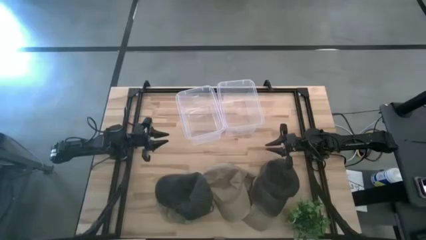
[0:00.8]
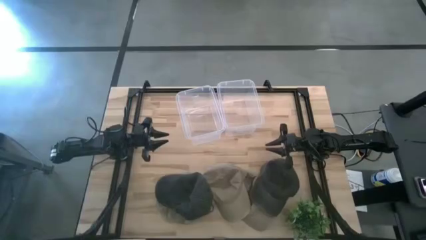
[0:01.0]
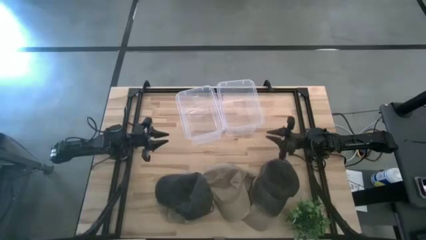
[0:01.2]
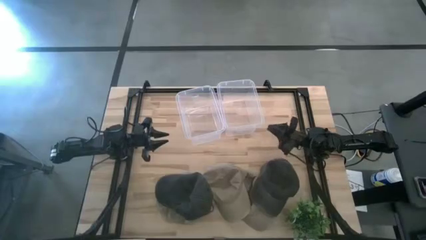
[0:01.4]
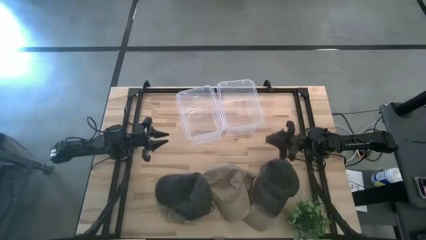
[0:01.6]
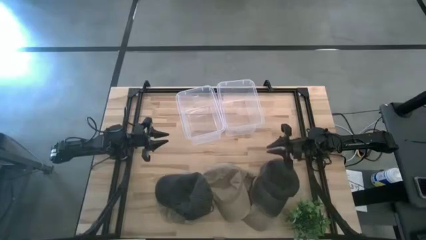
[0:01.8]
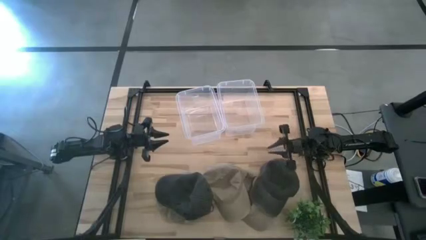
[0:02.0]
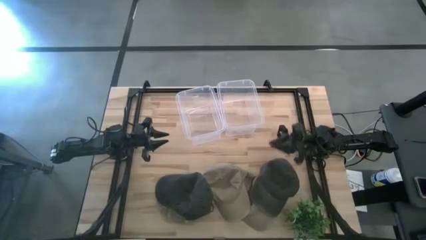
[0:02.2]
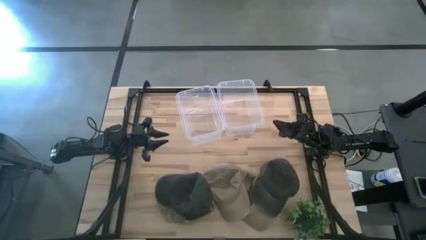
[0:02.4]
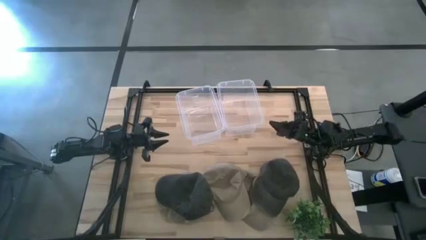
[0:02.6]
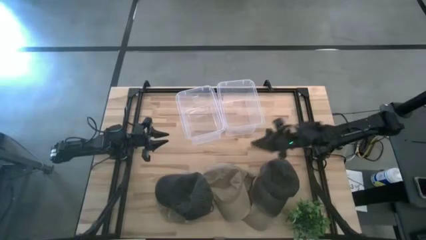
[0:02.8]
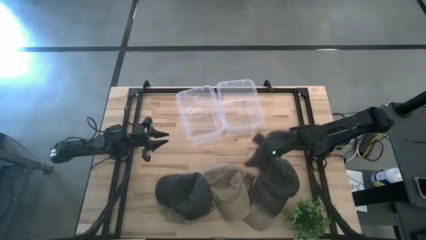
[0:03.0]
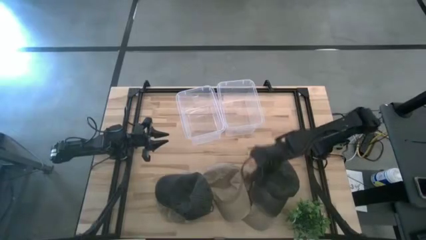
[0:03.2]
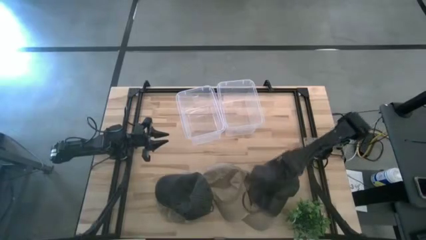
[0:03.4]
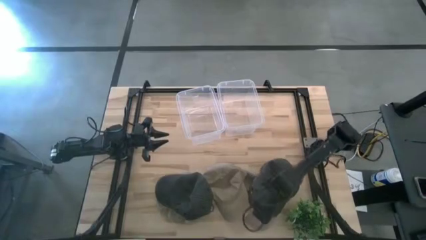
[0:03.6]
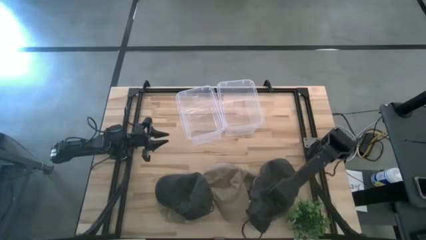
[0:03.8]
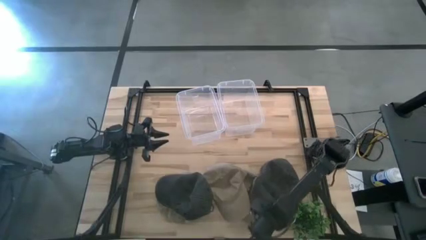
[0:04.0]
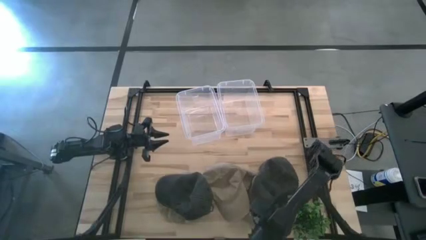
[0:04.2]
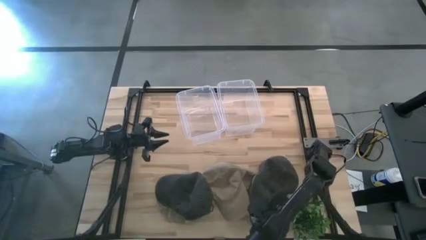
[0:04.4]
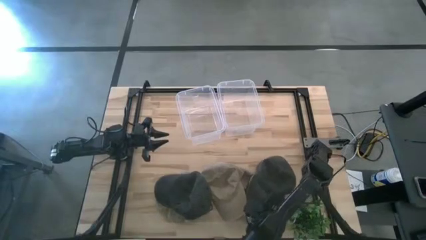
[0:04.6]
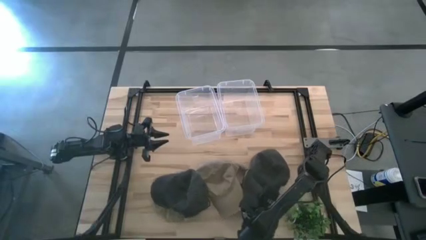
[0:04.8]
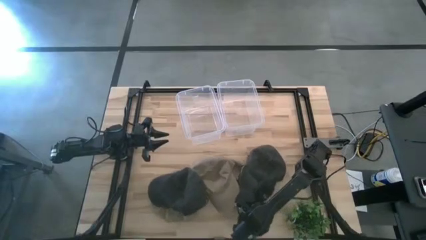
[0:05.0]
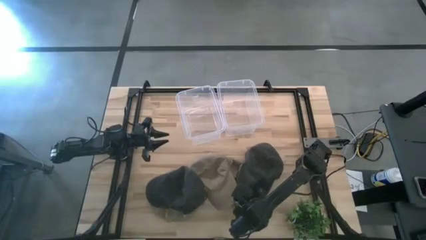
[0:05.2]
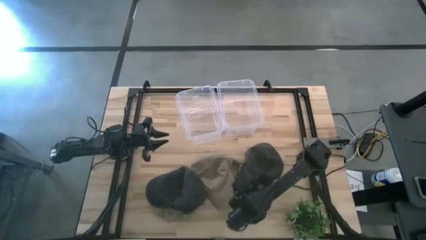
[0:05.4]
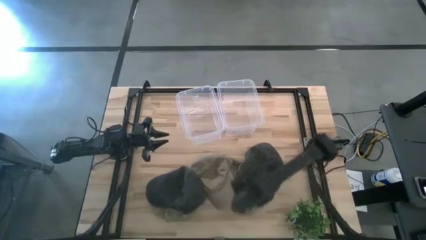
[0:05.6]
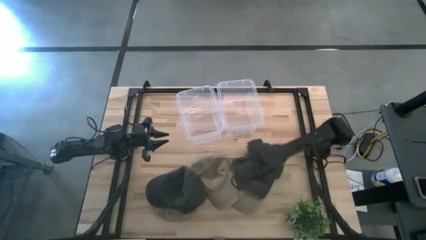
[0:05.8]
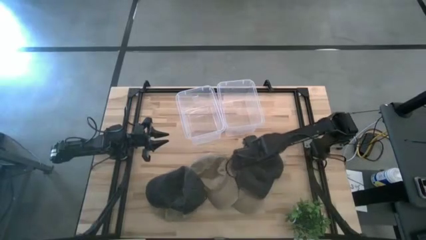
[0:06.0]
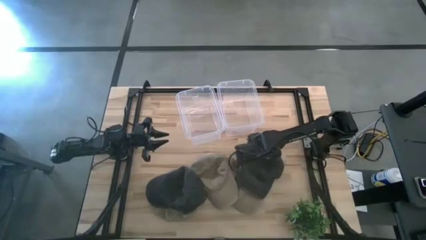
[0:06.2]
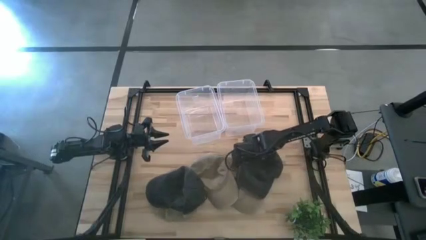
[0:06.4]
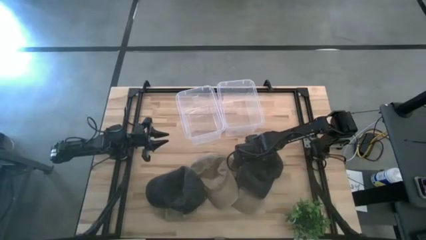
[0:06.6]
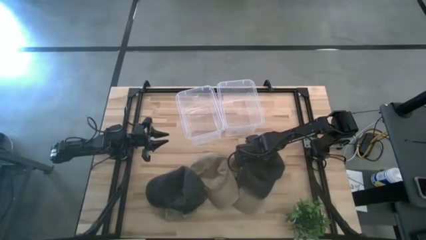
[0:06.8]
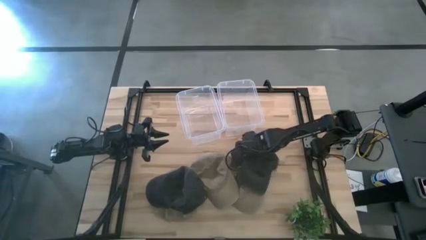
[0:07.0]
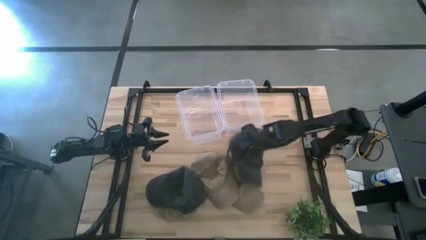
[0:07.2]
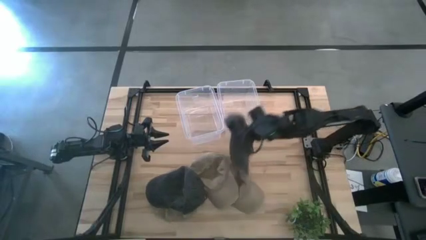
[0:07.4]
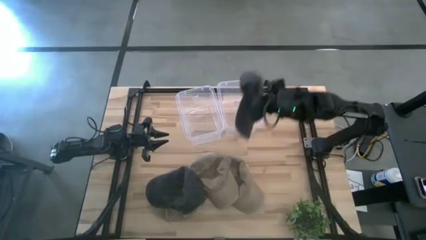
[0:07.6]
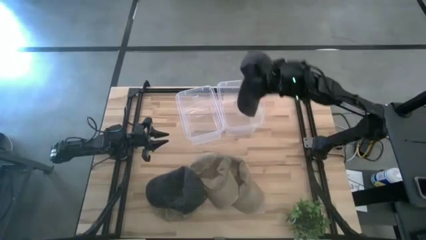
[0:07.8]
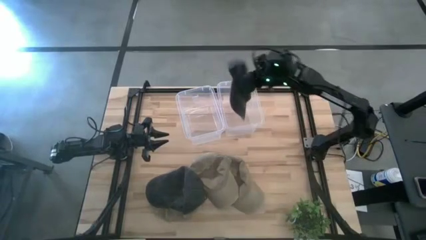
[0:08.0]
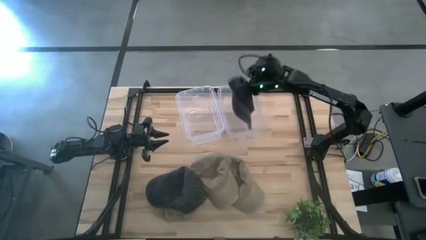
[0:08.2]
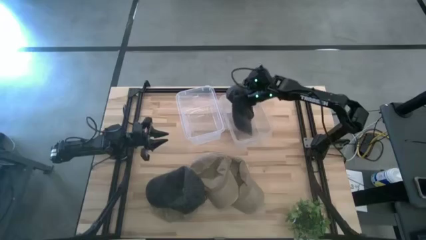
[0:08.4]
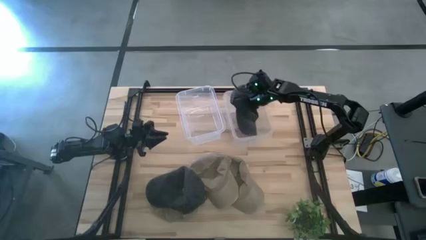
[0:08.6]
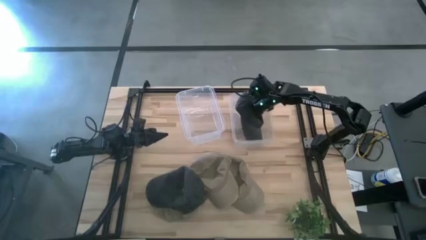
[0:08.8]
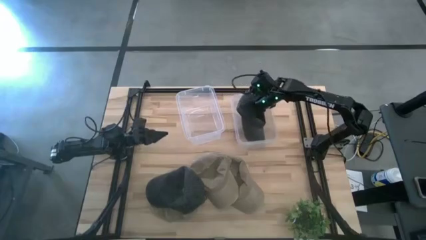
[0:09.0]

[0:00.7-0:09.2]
Task: Pick & Place hat
Put the right black cap into the right transparent bin

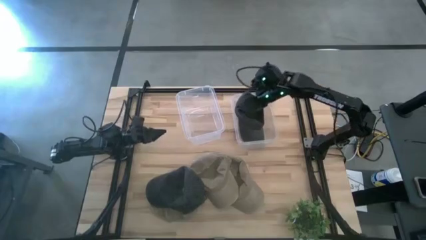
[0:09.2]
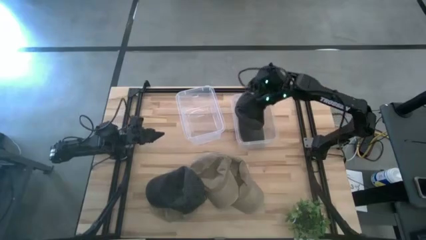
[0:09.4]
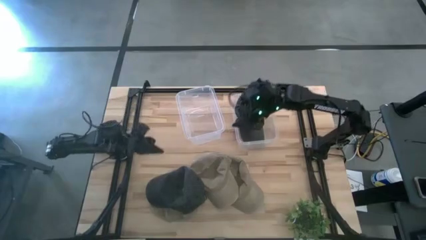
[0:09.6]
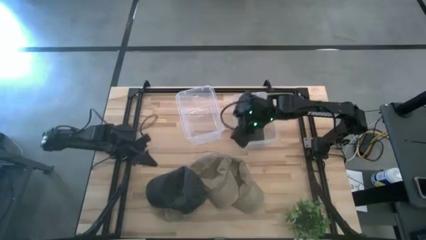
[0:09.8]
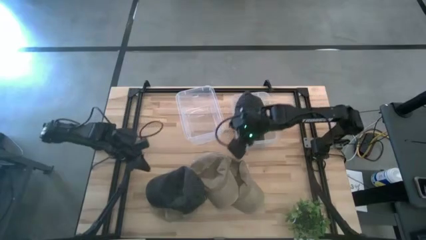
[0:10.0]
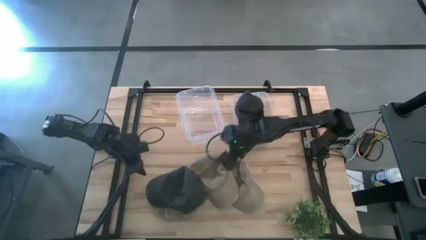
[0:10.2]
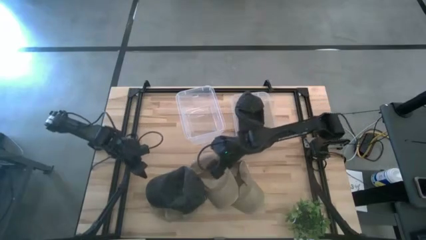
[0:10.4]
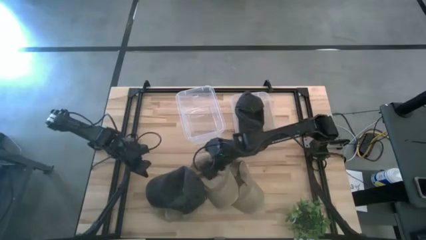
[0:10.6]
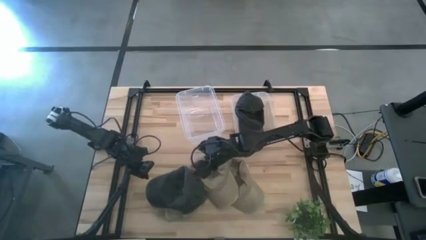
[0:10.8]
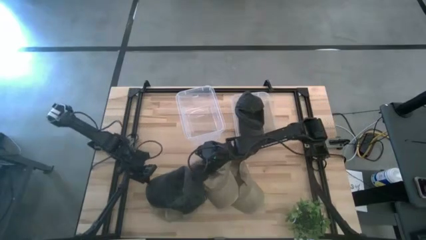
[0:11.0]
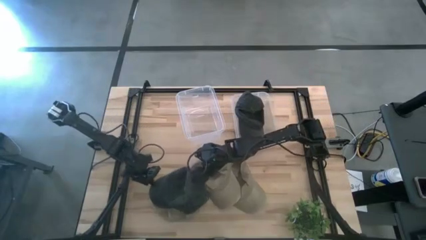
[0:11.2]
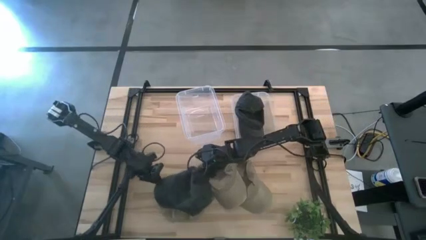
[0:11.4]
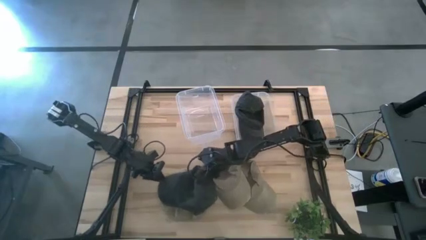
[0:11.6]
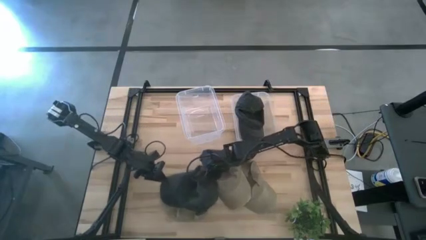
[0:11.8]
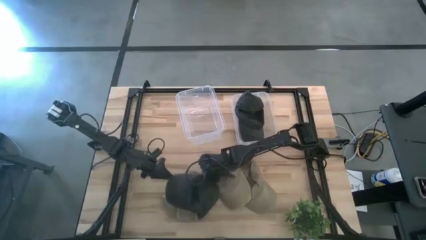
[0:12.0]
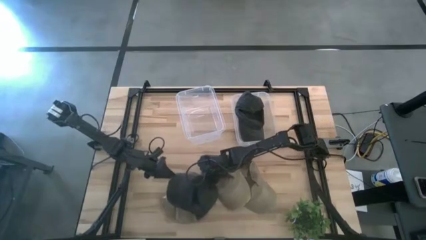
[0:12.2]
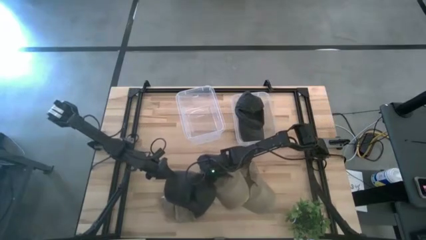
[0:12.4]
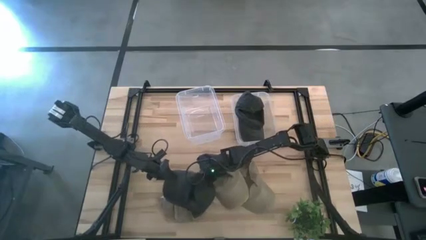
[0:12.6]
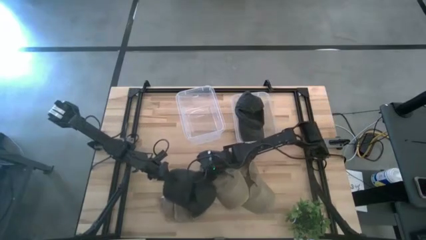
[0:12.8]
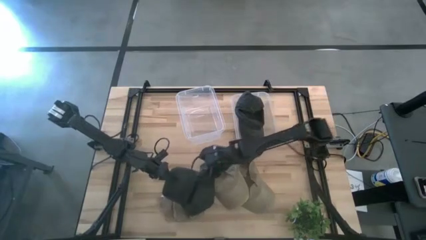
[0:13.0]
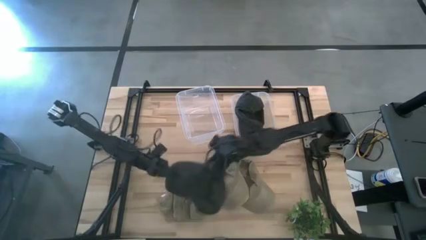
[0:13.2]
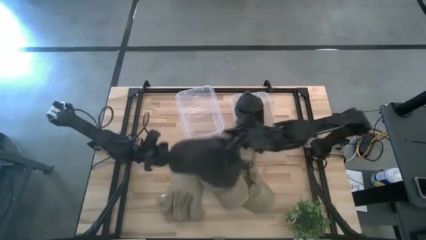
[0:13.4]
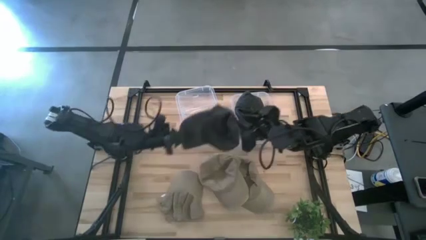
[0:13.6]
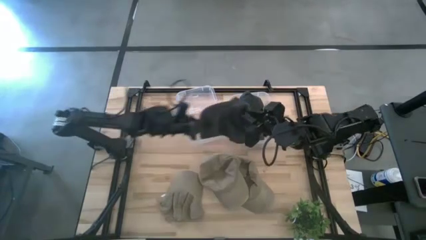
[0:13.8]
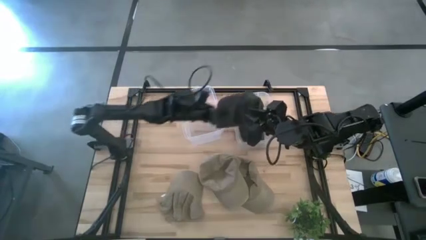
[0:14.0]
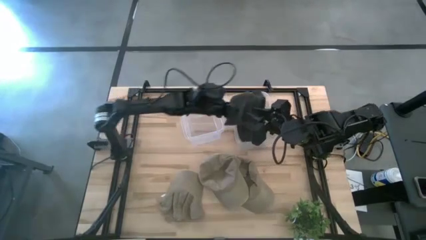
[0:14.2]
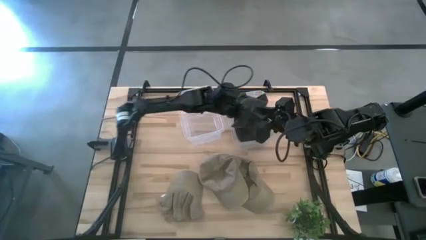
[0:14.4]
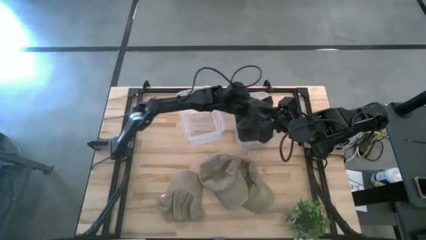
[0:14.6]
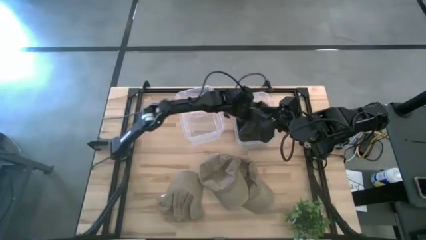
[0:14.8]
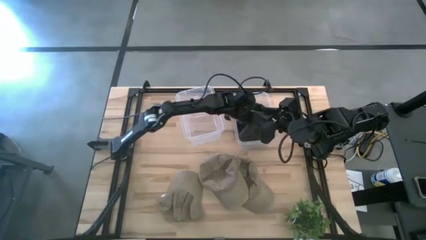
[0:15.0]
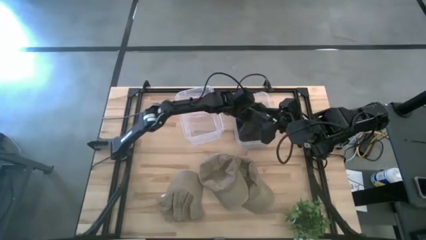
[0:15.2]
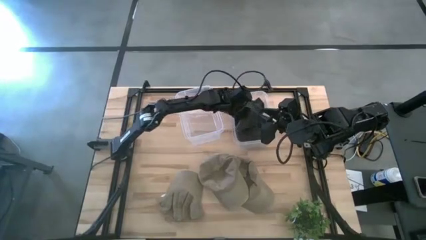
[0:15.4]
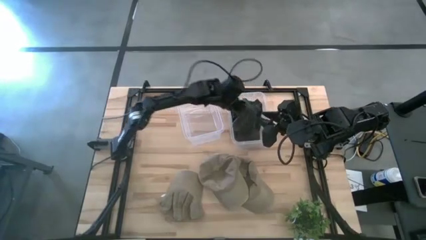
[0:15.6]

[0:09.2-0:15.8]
Put the black cap into the right transparent bin

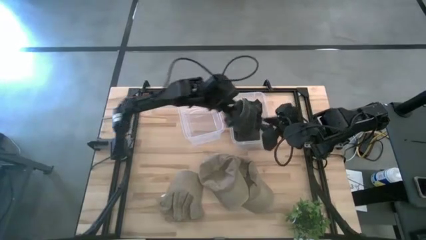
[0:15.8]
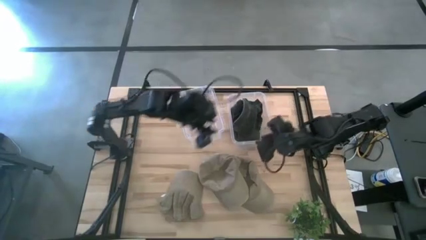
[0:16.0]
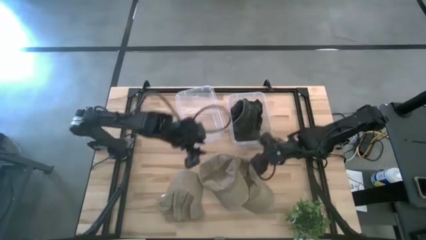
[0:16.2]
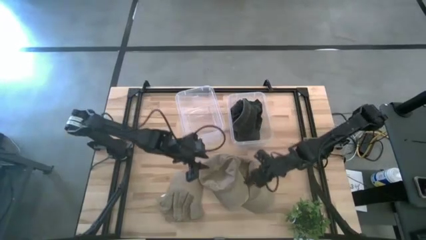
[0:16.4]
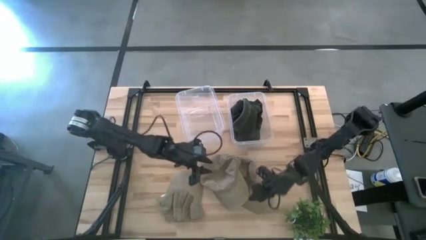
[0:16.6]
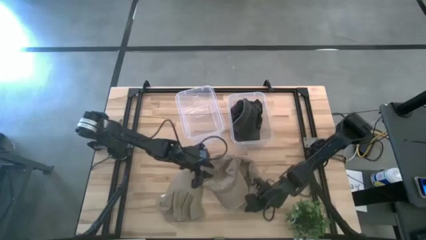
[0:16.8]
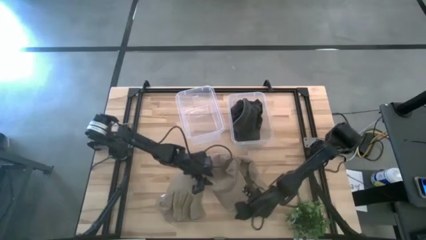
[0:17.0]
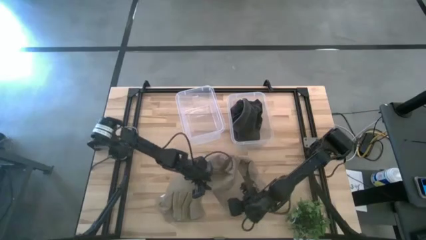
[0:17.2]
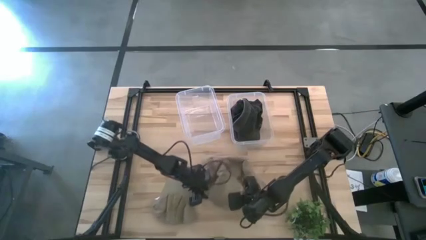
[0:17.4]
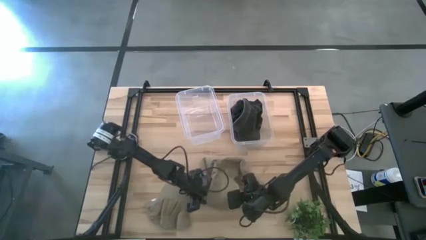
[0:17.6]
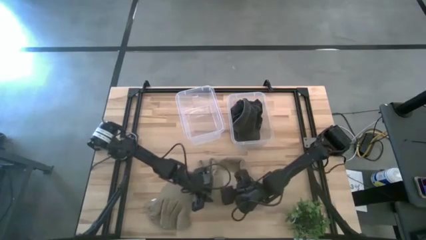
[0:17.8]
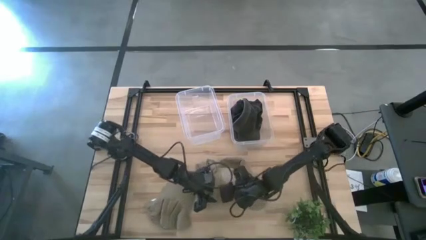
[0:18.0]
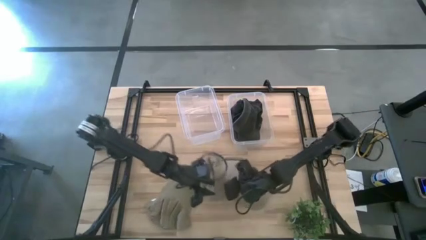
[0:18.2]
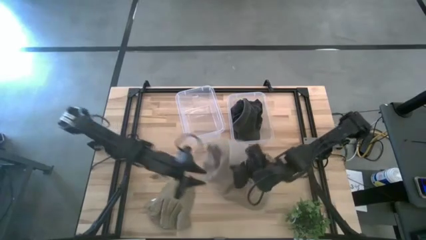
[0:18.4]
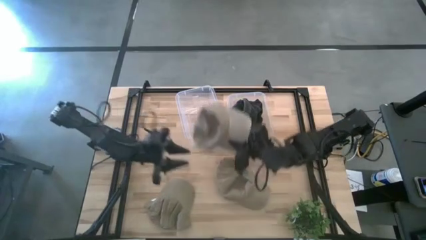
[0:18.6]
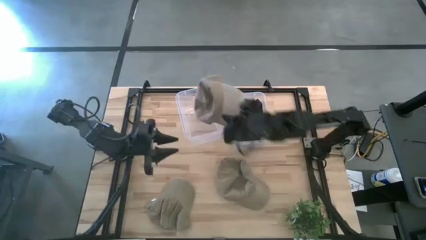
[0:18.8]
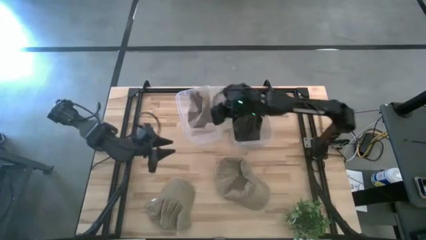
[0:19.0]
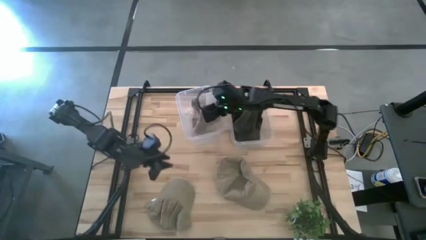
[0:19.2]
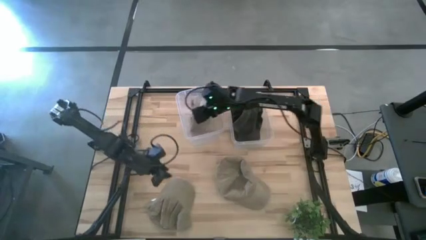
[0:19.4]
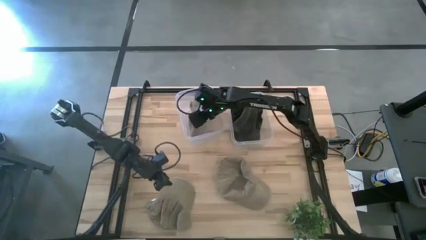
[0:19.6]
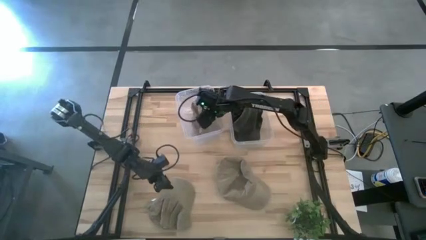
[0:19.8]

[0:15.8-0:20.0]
Put the middle brown cap into the left transparent bin
